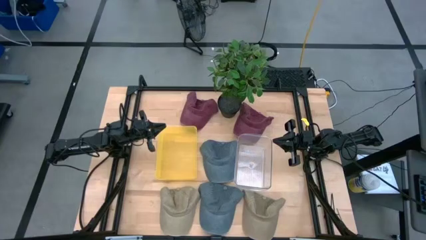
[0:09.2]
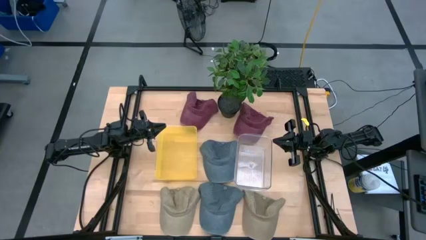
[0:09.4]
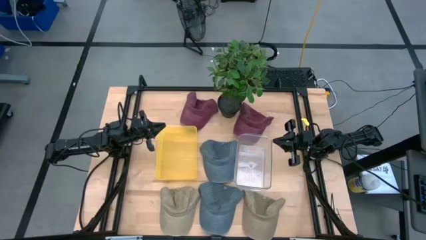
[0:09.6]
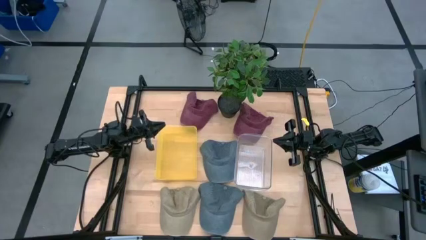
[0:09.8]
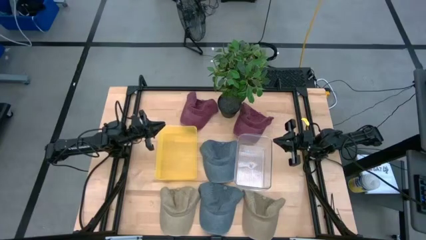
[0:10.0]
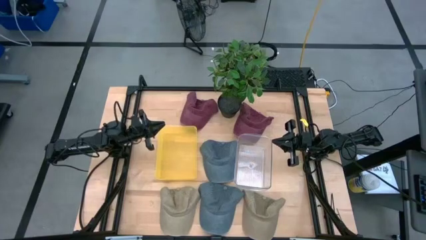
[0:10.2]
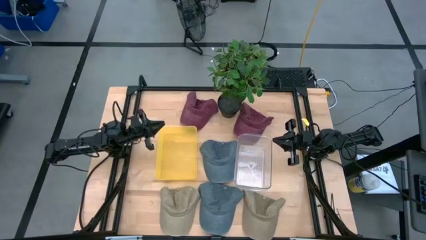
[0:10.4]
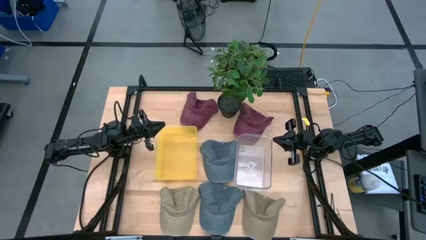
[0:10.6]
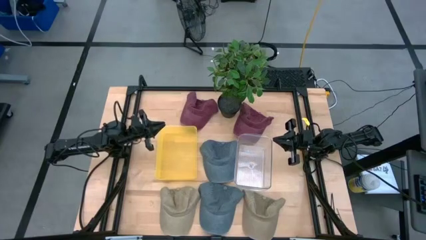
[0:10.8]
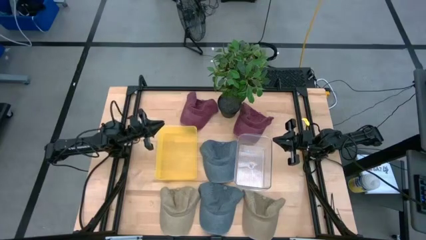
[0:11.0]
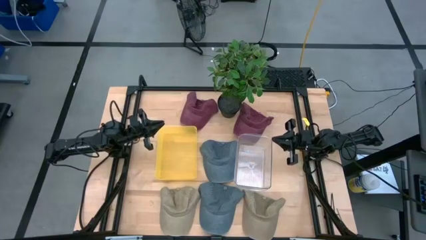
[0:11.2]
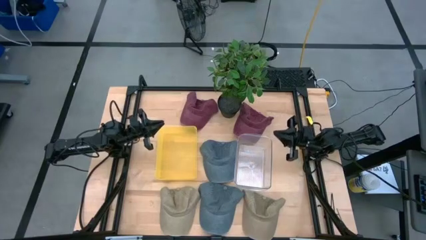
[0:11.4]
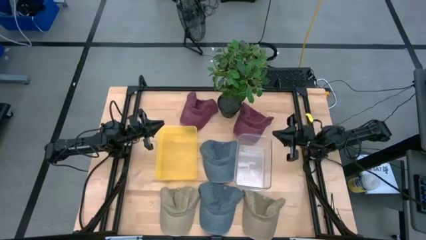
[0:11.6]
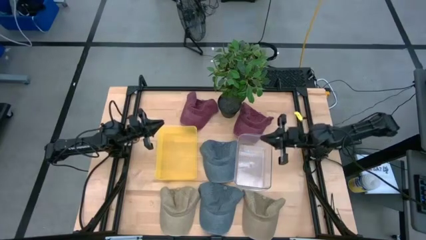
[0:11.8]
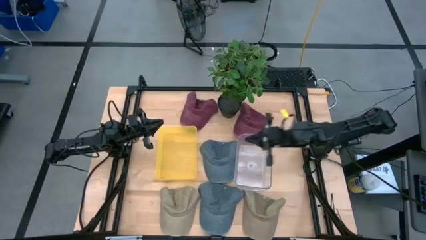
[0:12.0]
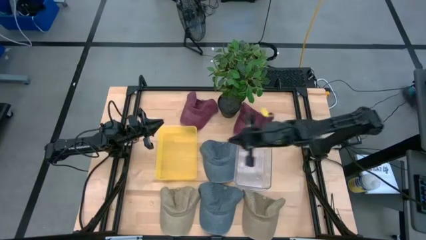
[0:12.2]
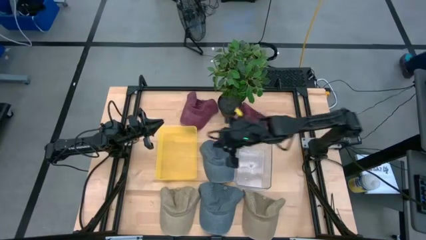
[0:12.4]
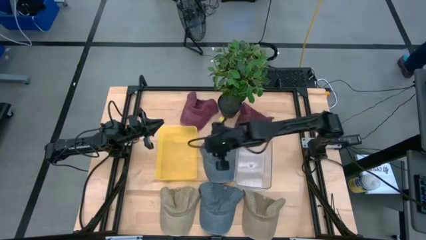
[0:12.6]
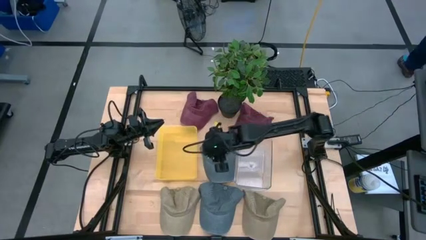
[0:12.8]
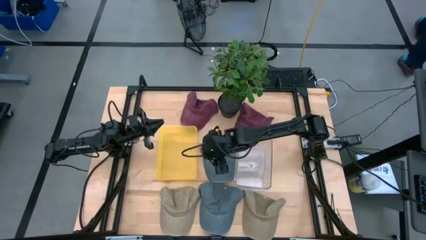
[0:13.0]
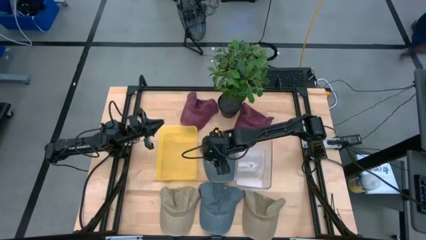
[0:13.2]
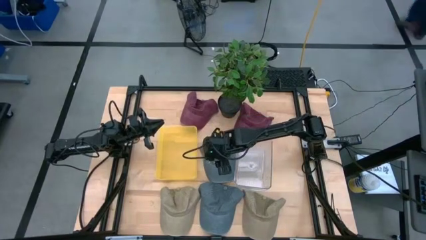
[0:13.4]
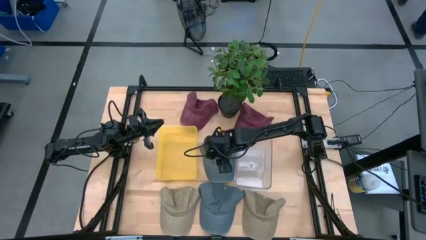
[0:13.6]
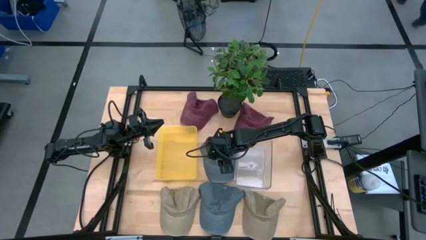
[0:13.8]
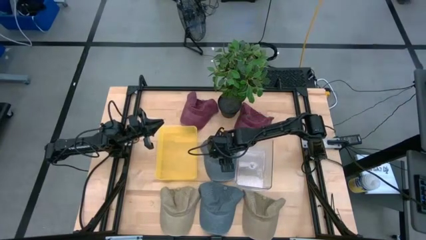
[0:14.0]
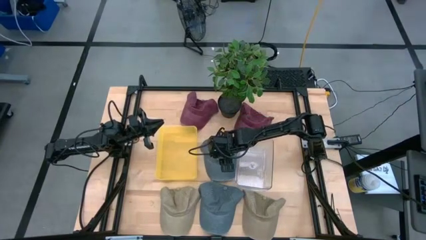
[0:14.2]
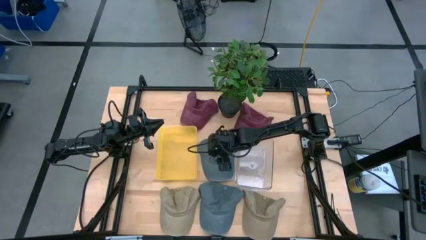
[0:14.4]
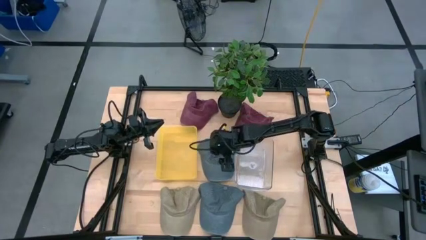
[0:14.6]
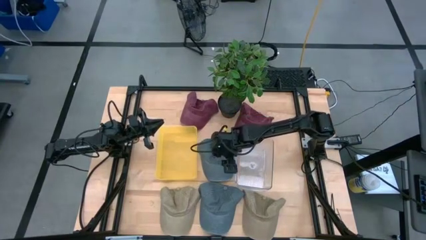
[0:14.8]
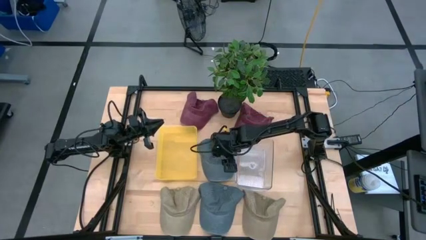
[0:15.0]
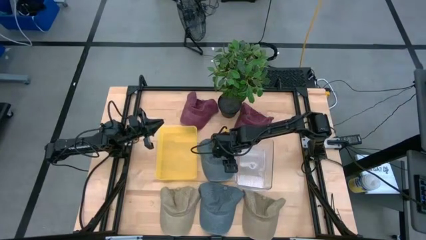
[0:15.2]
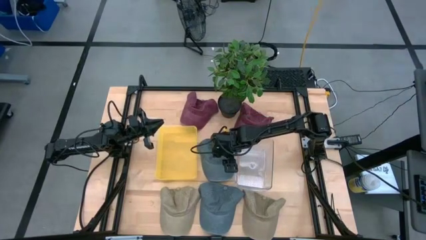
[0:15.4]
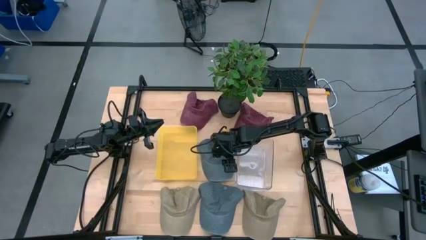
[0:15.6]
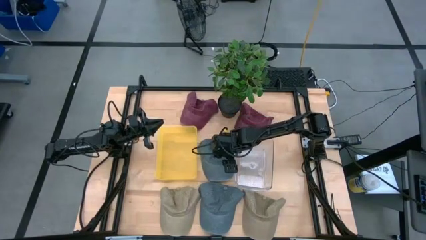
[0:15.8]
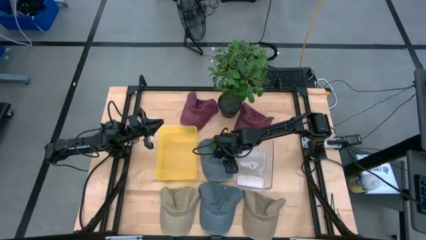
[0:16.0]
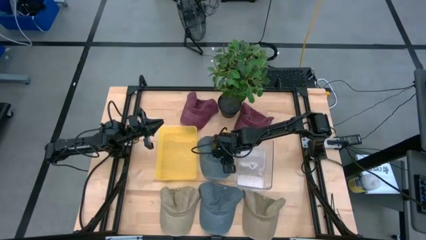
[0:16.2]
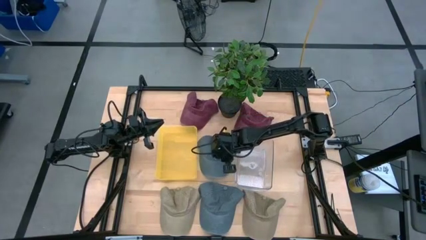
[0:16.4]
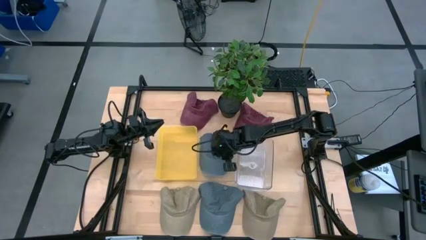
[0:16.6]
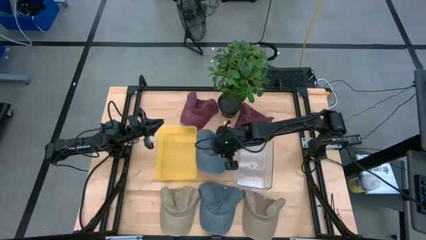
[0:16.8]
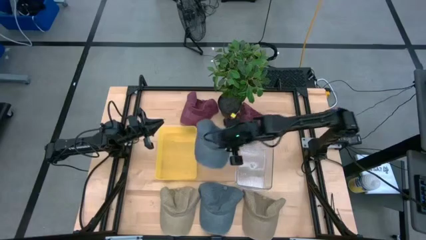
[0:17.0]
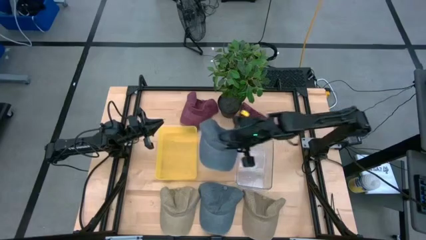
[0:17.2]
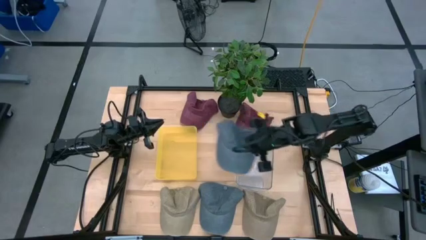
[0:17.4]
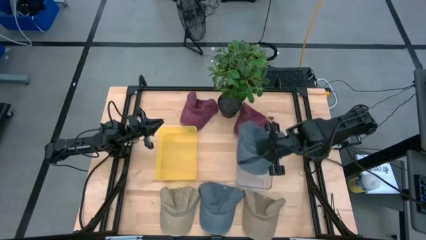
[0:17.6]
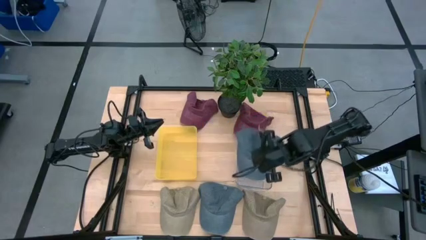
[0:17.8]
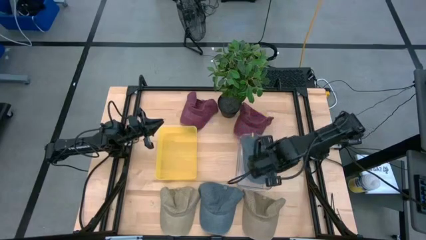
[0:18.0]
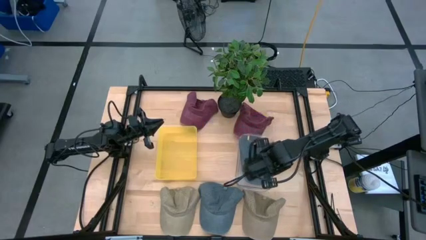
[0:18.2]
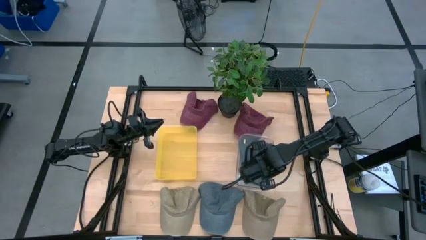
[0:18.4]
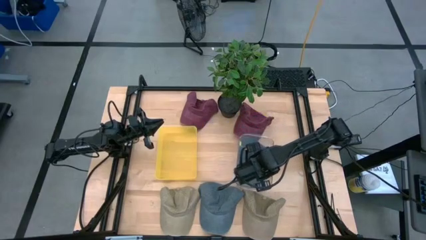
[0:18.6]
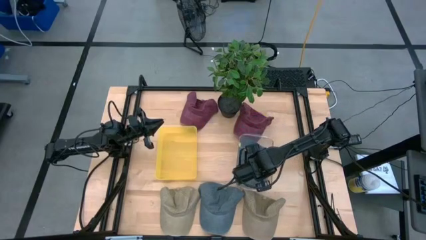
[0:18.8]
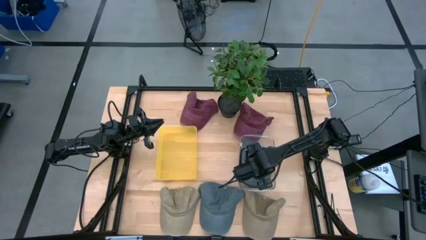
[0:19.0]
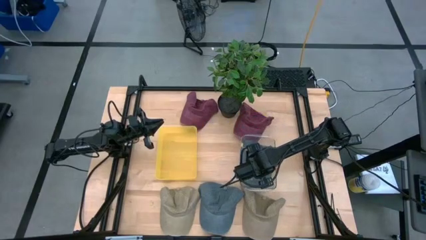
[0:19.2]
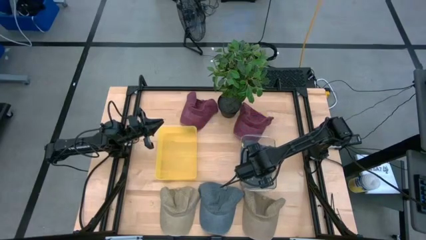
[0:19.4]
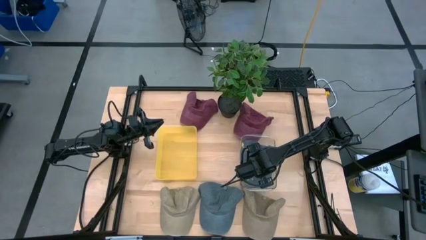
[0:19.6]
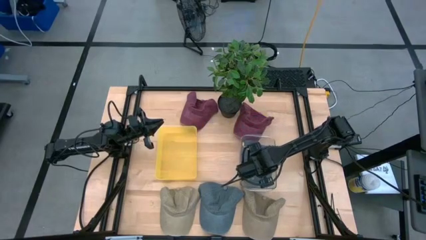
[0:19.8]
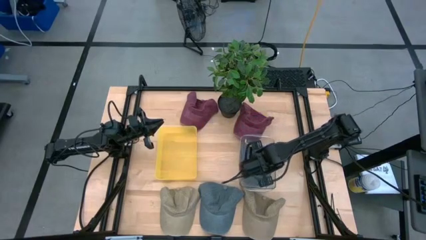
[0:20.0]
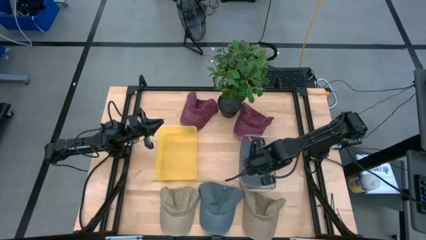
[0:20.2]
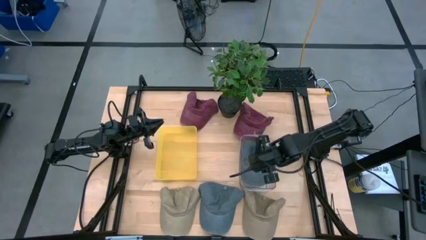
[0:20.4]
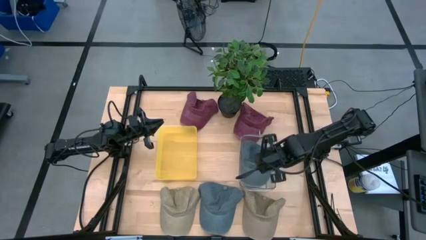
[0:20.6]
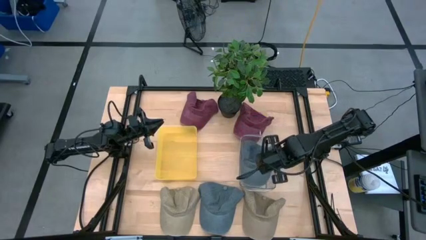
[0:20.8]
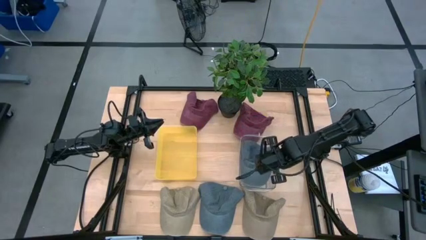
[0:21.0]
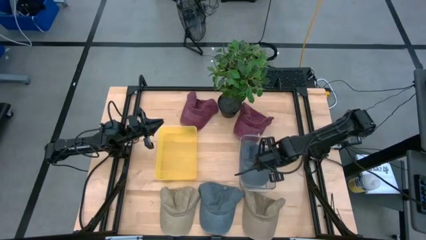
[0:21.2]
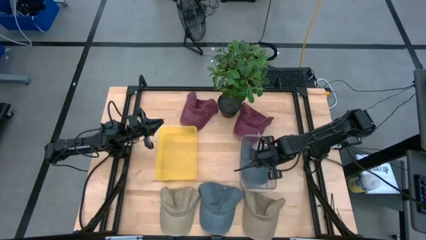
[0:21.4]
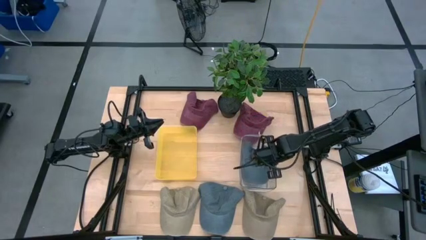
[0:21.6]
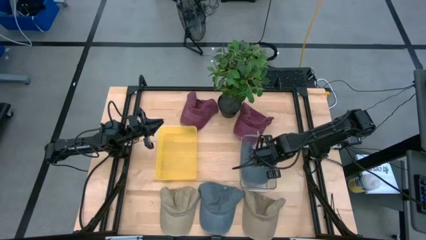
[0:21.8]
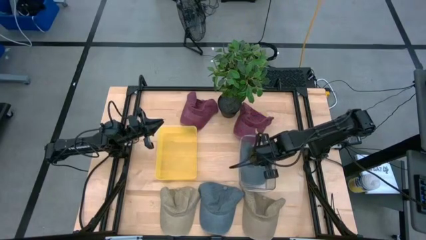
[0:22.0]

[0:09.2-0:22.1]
Task: Pick & Place hat
Put the top blue cap into the transparent bin

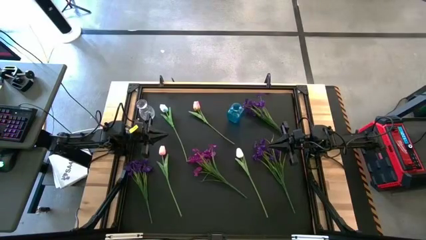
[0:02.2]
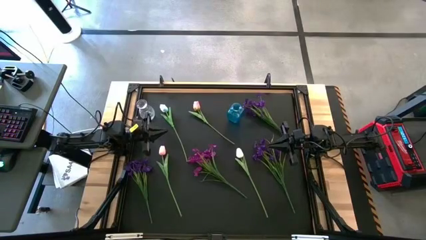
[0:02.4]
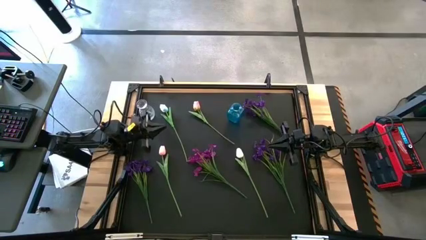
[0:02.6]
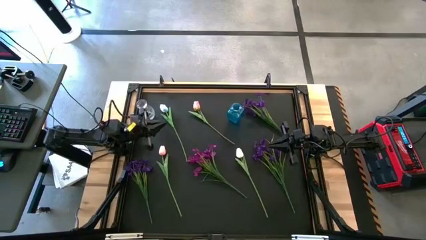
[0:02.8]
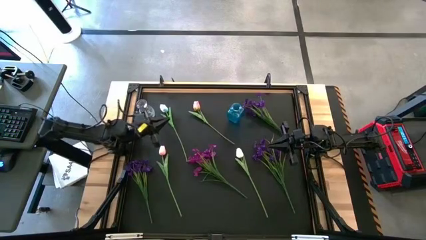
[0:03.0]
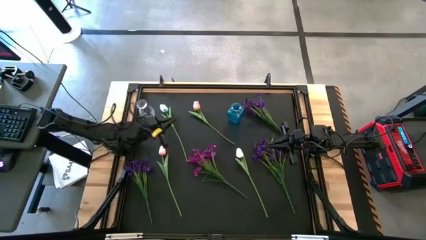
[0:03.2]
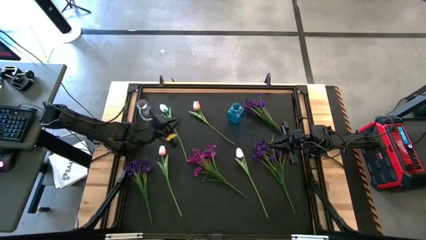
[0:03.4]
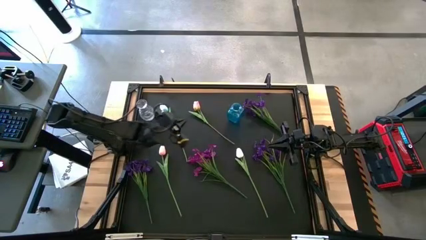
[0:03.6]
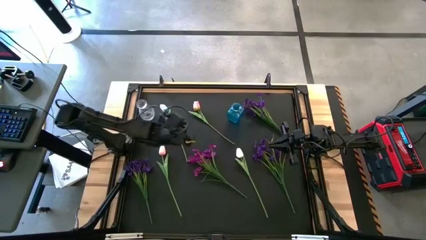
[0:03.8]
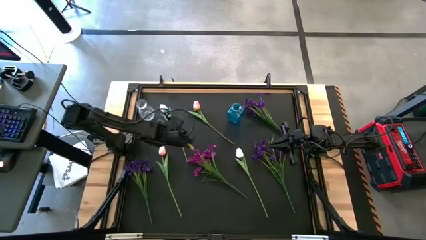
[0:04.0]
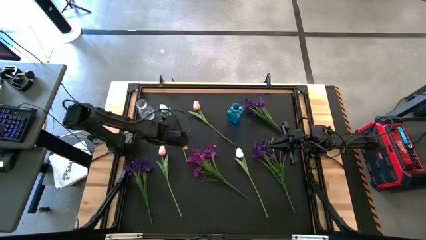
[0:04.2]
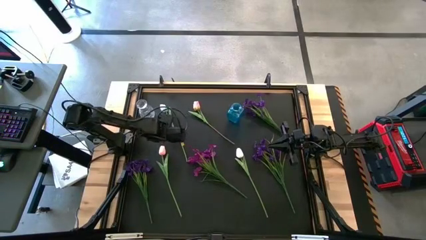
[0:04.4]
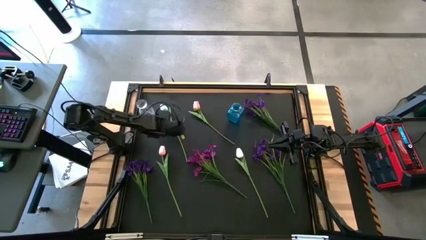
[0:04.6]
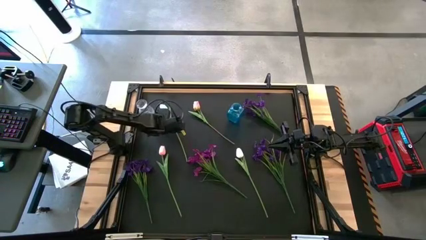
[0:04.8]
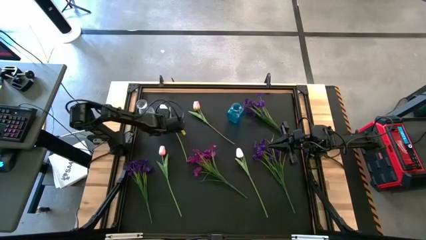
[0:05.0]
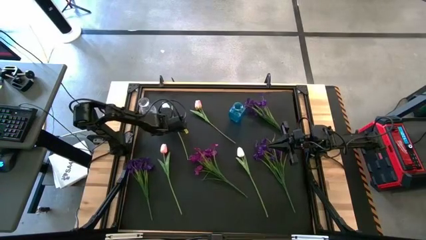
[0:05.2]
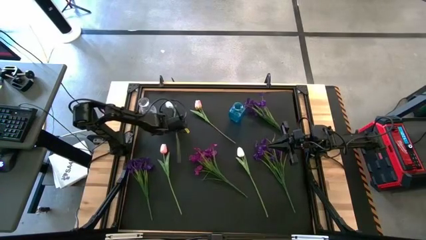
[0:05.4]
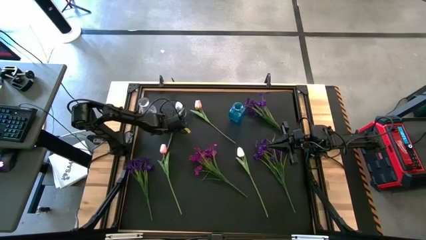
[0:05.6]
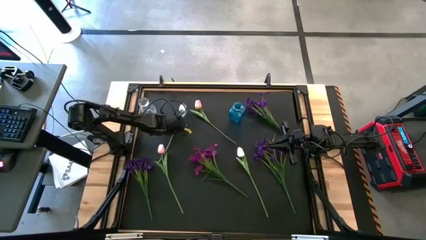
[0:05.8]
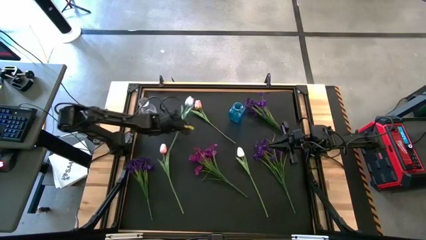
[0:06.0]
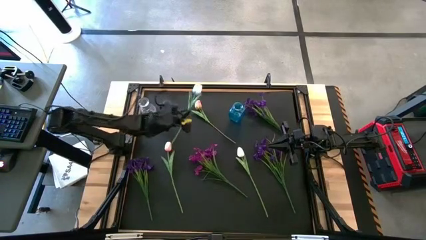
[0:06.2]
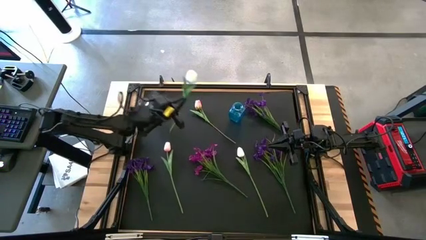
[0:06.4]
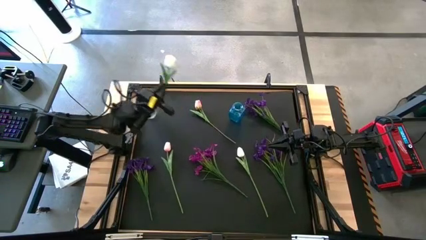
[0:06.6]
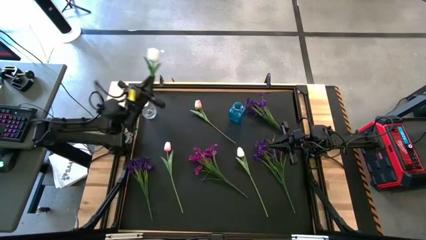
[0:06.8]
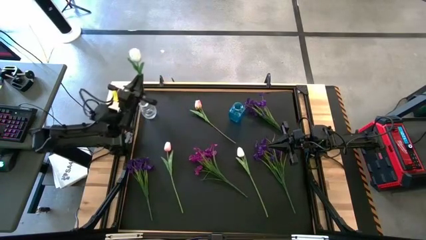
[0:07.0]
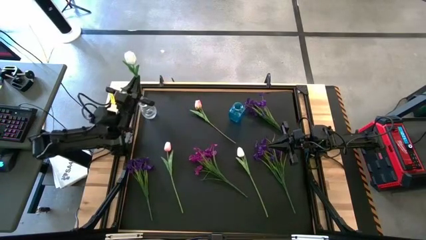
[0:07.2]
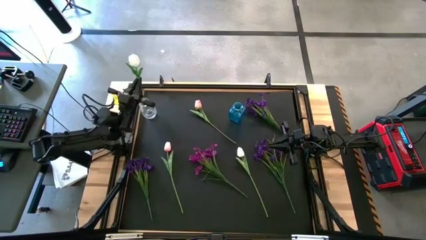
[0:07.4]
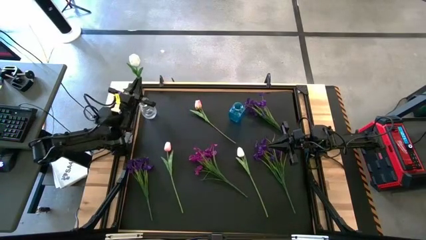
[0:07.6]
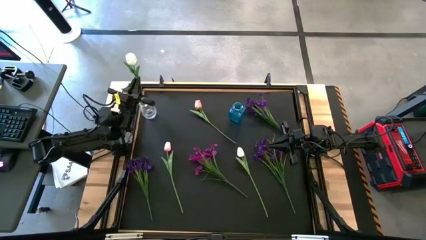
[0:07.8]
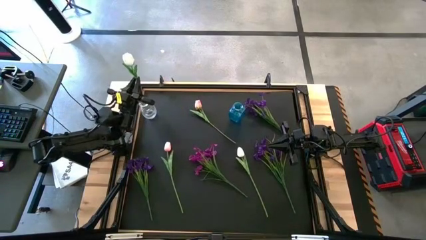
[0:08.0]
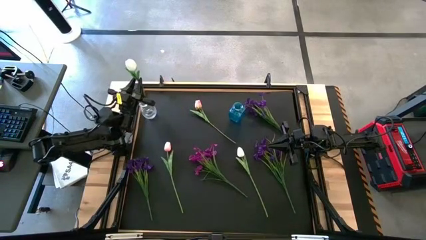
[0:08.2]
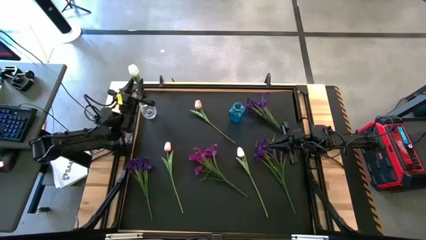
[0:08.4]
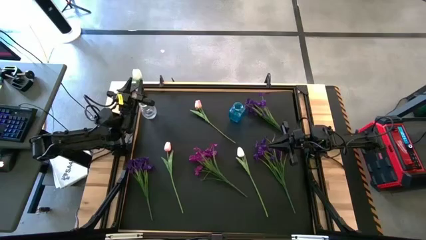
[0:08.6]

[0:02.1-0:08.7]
Task: Sort flowers into vase by color
Put the top white flower into the transparent vase
